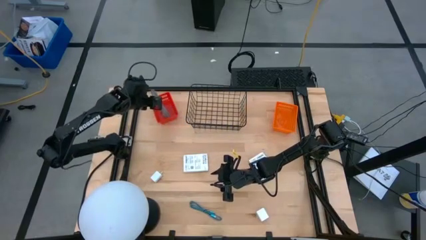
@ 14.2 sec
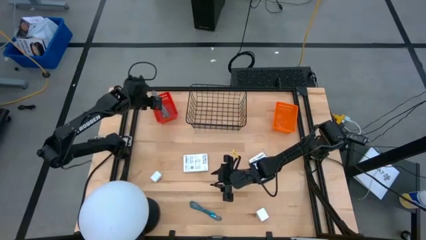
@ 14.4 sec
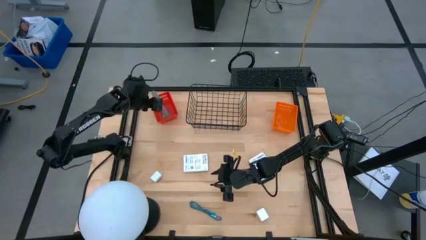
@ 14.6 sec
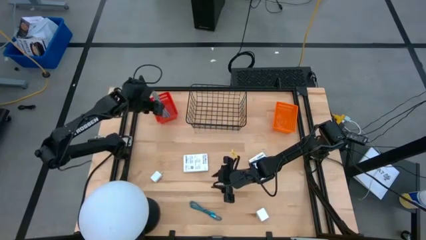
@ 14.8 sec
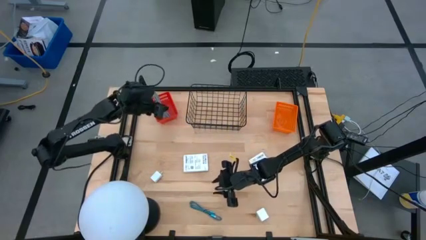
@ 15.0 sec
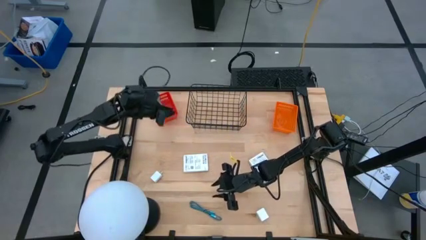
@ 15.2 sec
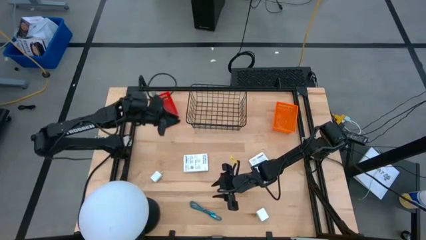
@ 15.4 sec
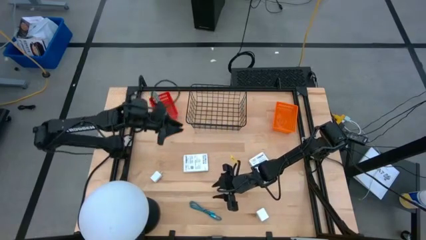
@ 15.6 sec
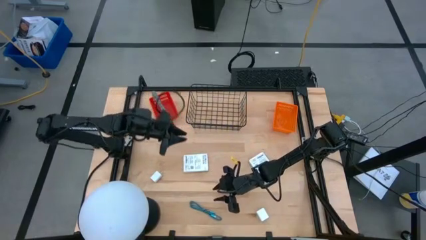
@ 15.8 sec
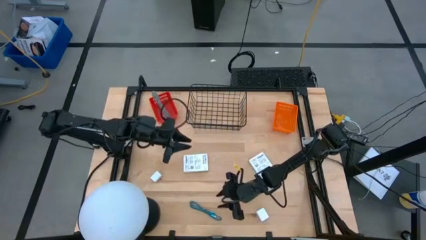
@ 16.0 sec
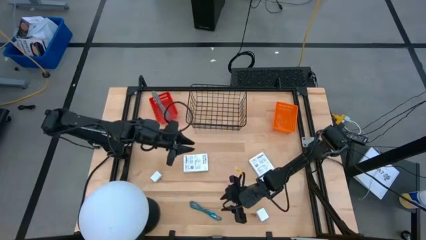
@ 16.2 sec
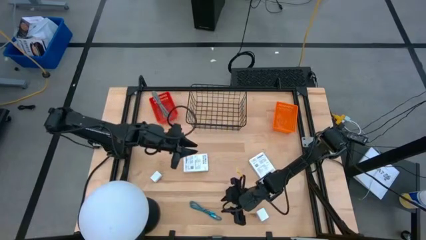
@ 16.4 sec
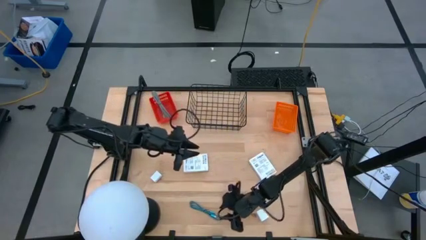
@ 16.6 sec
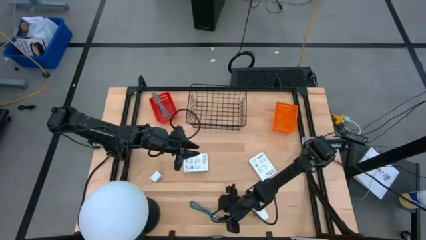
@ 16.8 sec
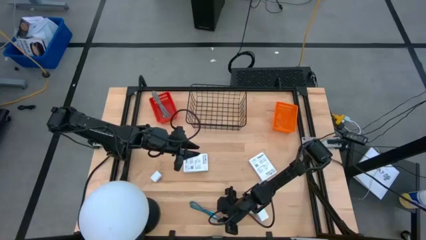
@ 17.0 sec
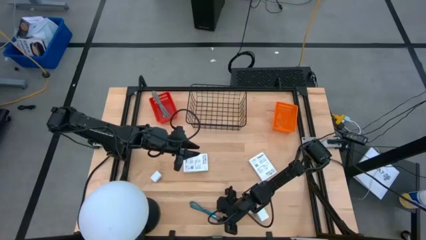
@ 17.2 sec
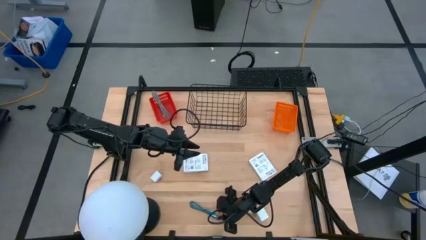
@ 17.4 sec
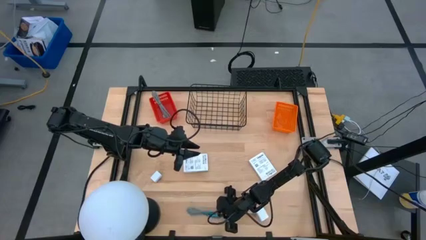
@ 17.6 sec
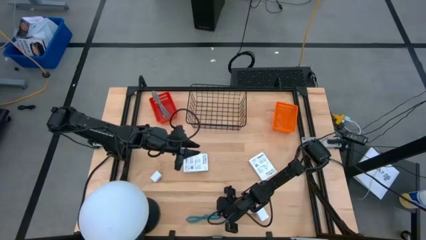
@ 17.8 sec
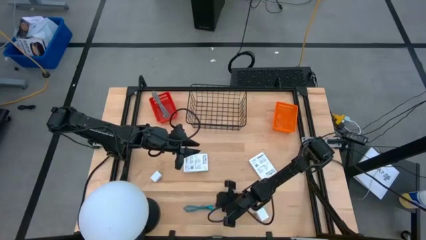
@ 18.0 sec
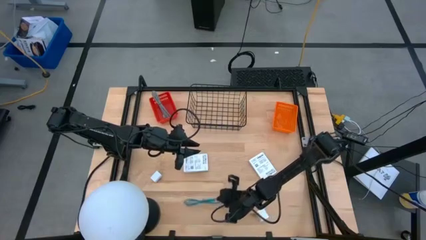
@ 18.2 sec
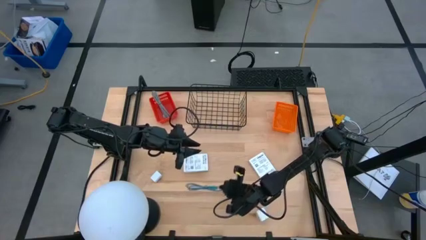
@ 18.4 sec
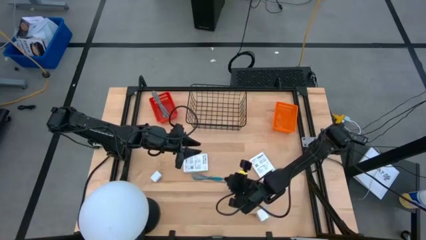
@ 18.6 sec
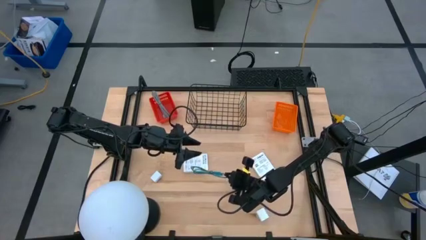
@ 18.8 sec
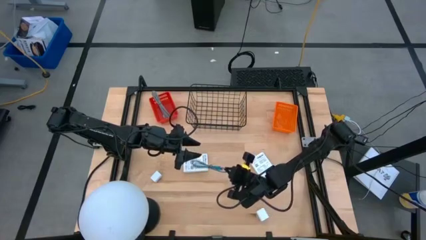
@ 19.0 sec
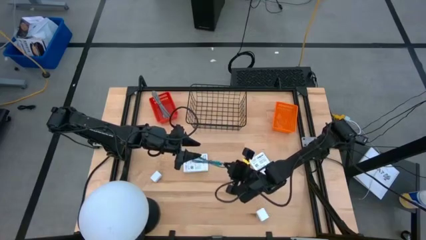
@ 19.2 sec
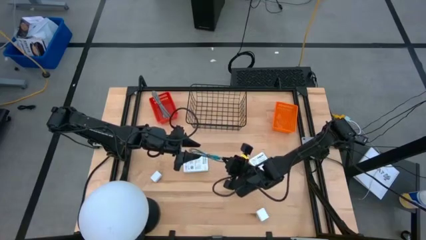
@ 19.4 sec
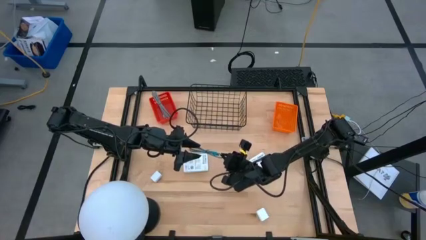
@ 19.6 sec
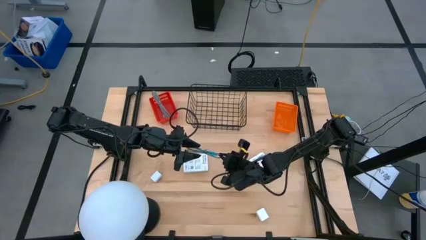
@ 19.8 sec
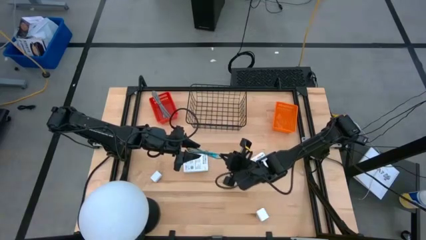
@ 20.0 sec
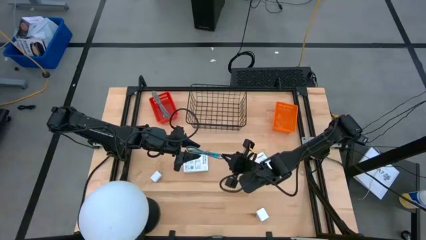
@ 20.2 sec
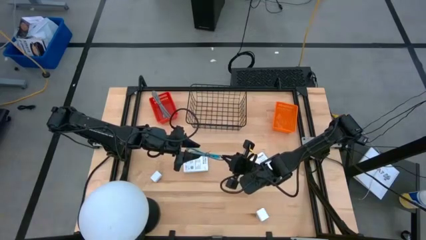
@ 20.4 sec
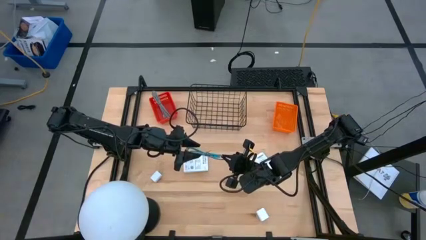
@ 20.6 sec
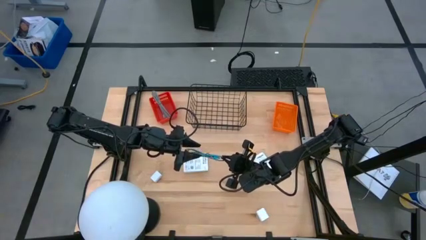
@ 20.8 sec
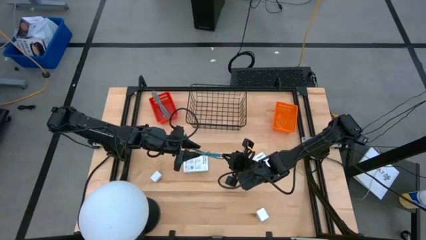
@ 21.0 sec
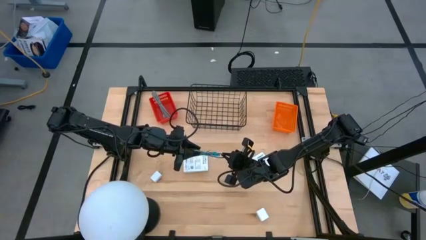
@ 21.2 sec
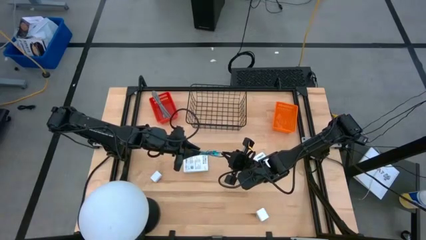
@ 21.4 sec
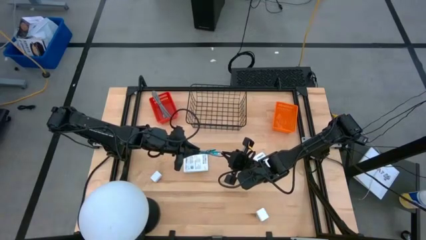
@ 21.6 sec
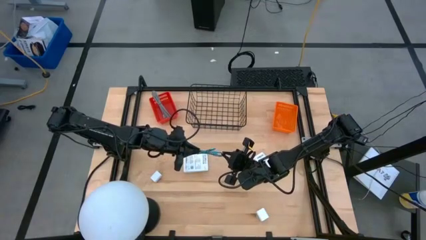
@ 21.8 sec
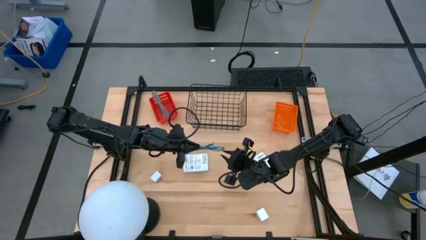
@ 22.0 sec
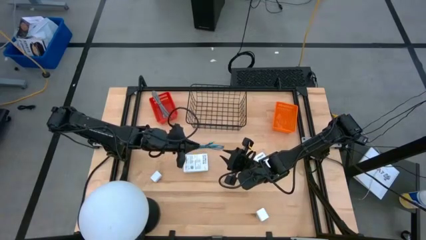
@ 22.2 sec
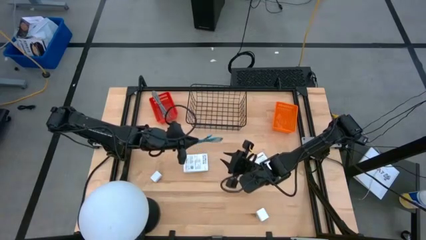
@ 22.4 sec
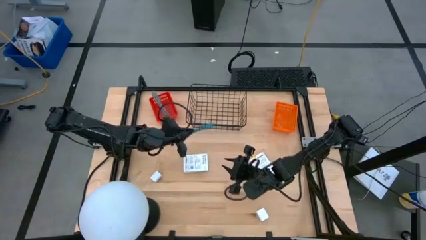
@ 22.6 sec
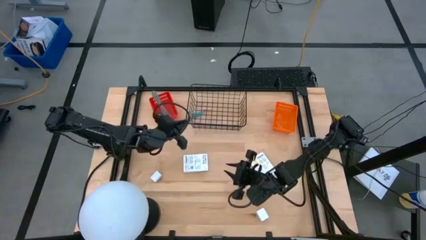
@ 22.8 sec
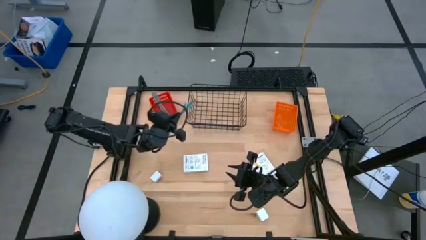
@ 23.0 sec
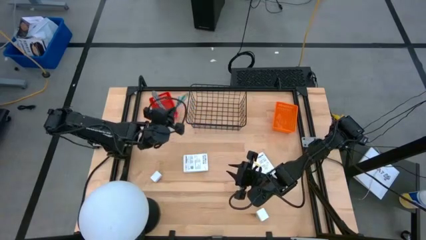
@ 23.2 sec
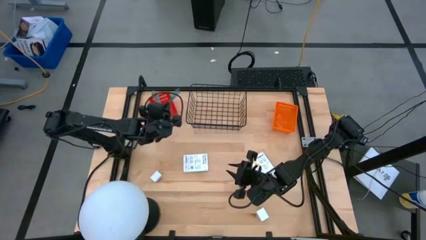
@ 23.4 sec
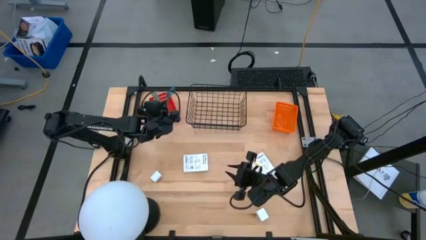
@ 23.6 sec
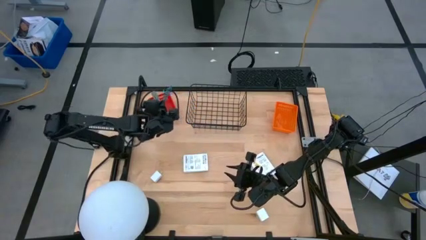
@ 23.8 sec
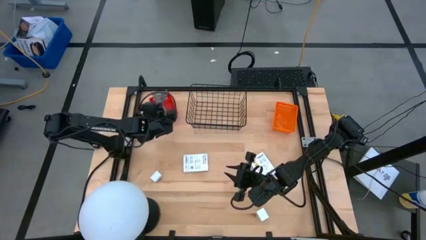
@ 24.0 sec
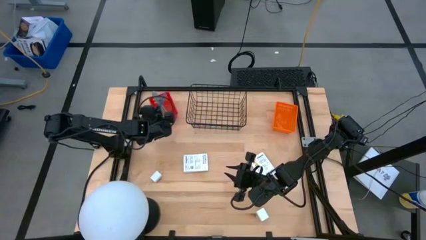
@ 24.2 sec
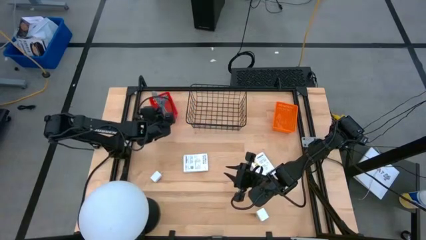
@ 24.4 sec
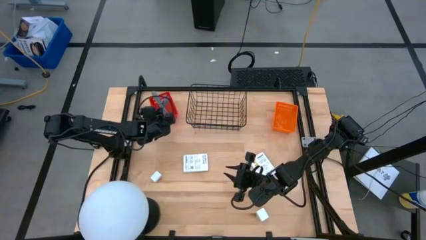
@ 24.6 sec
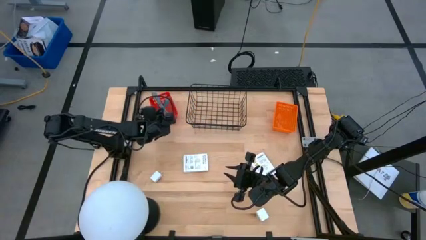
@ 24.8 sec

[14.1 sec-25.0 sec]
Task: Pick and place items into bin
Put the black and blue charger cable into the red bin
